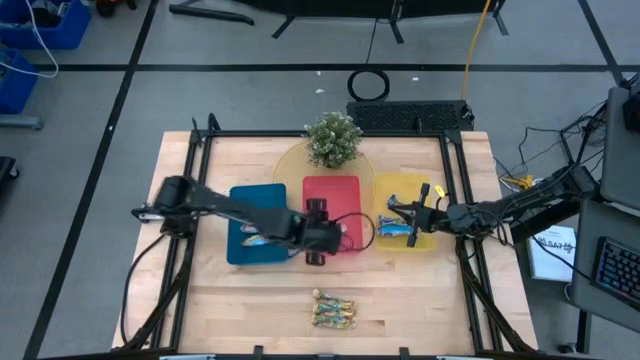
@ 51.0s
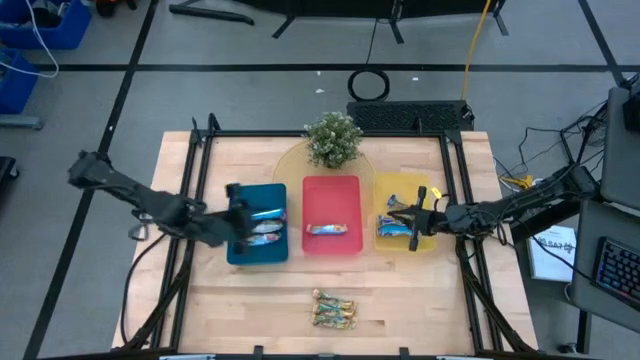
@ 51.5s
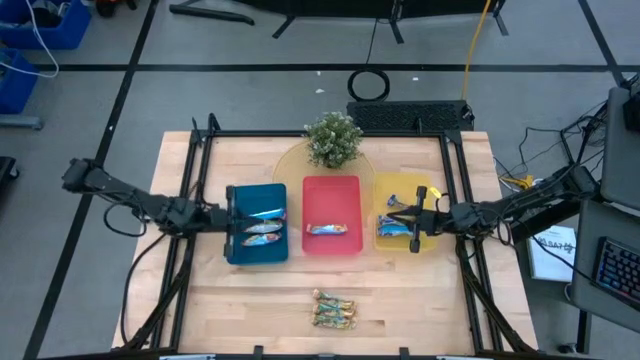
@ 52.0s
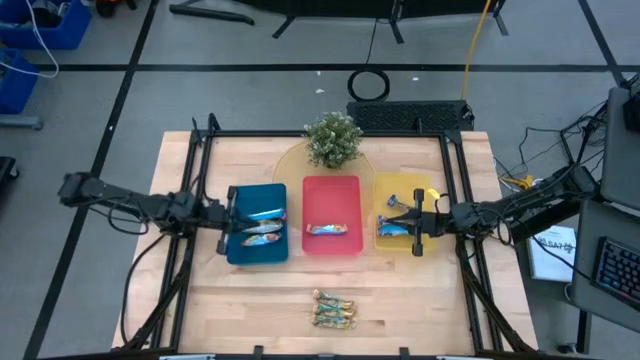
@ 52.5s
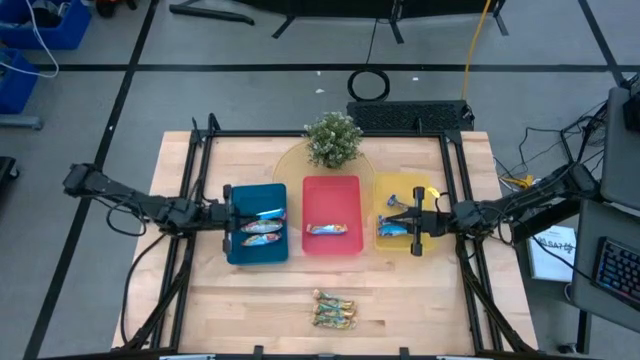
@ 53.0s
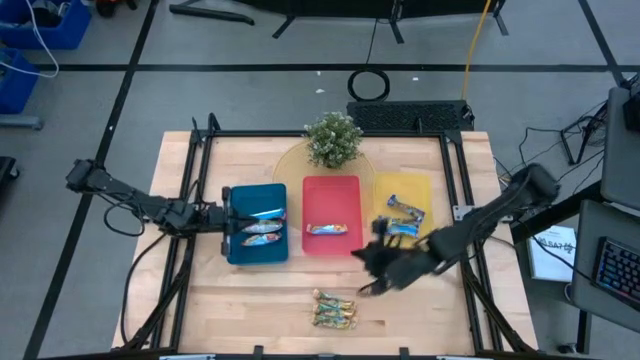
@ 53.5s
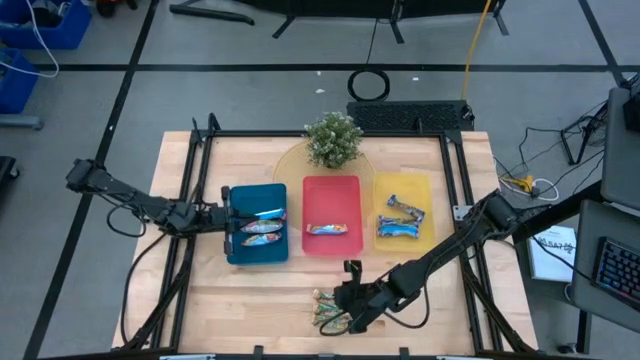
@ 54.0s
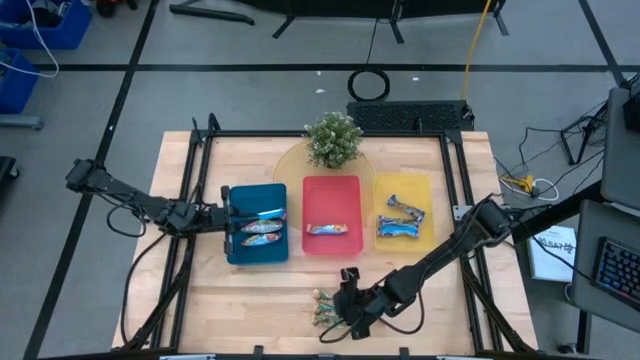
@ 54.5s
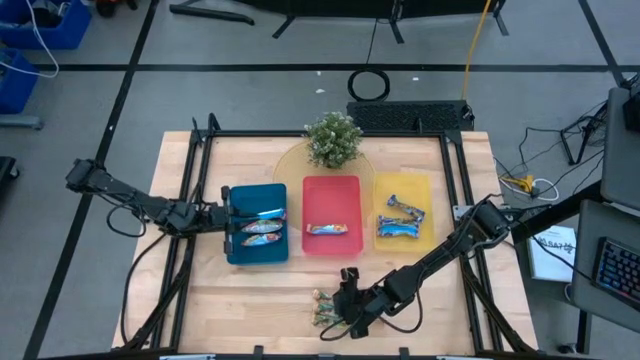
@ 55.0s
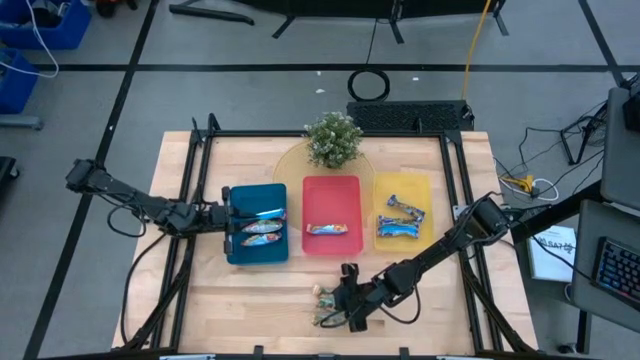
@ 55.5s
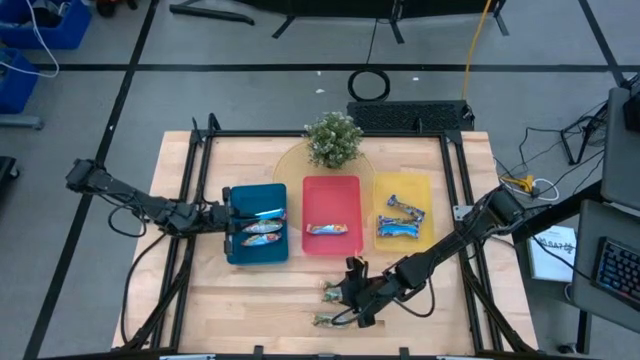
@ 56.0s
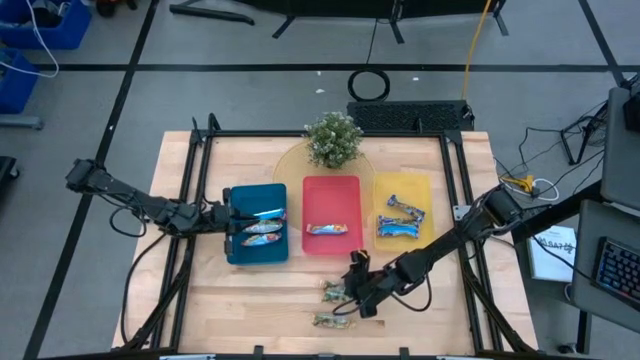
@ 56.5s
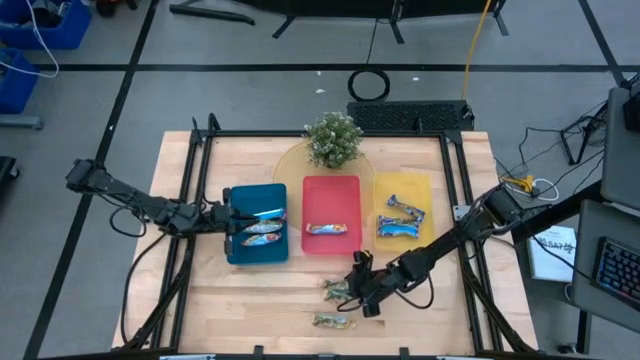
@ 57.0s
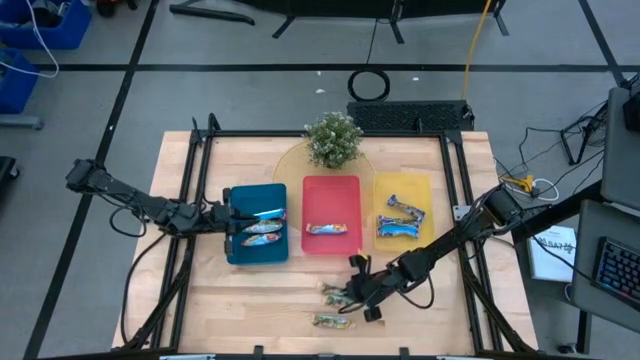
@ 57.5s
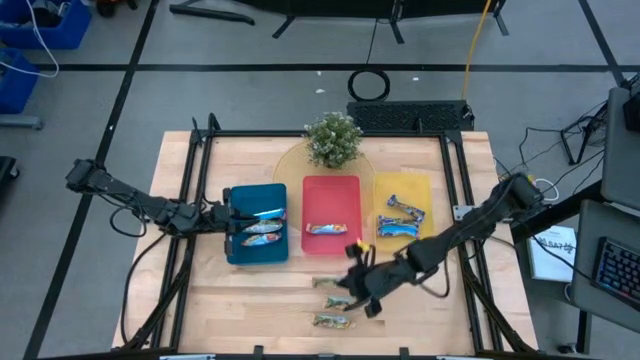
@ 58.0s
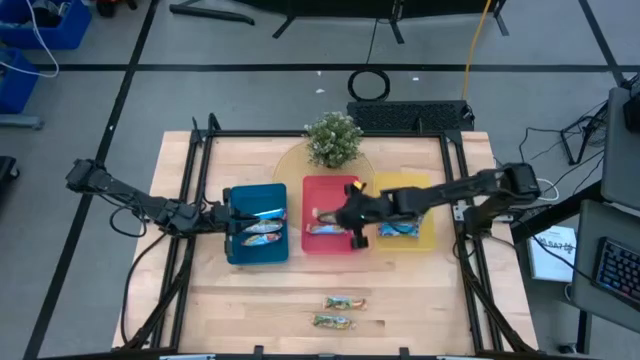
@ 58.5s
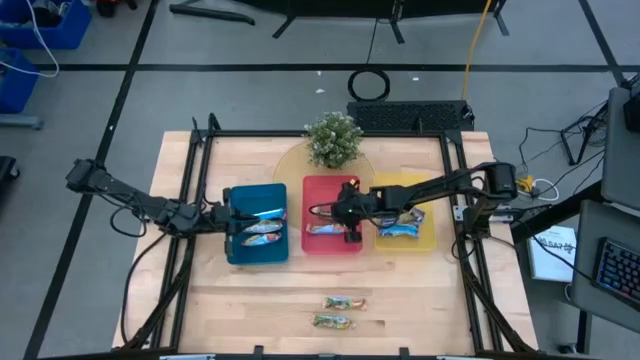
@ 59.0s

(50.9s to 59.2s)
Task: Pick and place Granola Bars by type
Put the yellow granola bar into the red bin

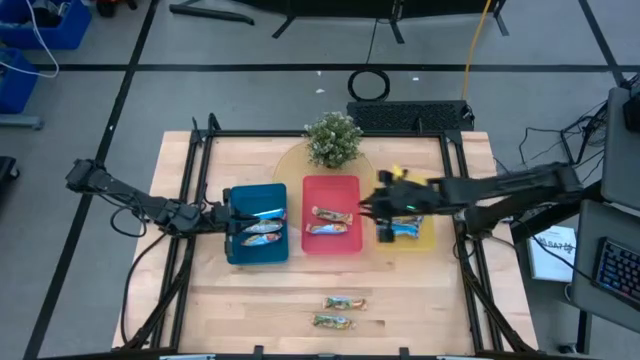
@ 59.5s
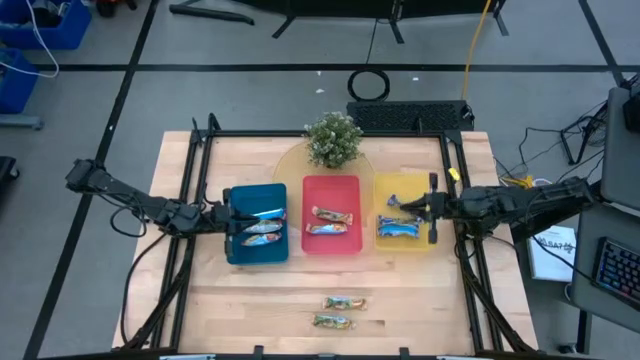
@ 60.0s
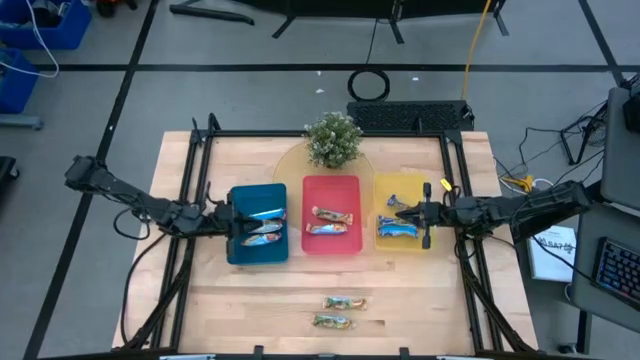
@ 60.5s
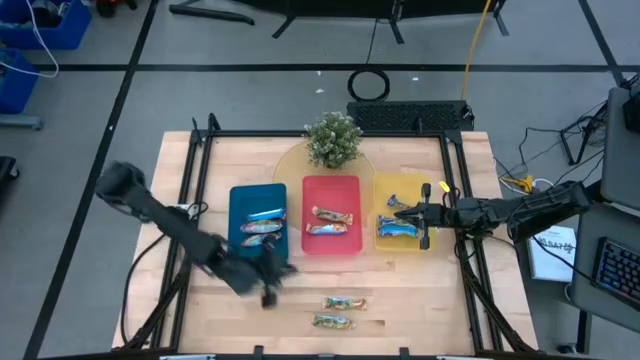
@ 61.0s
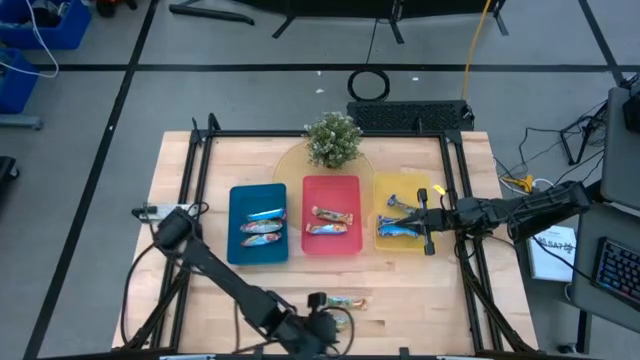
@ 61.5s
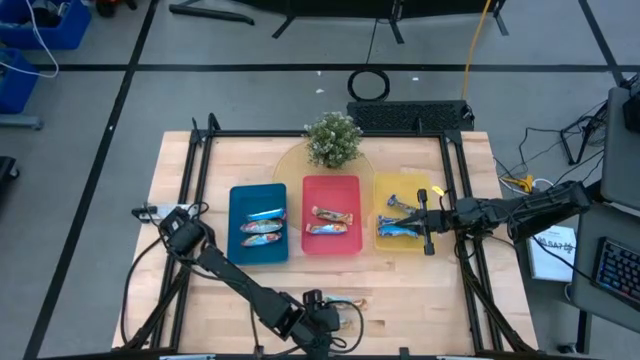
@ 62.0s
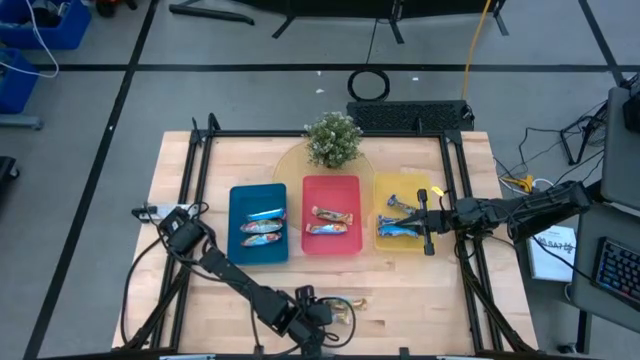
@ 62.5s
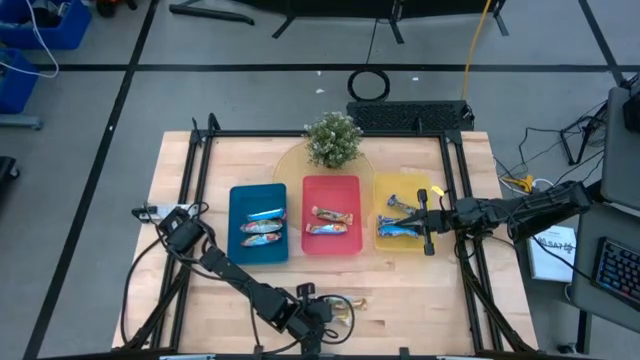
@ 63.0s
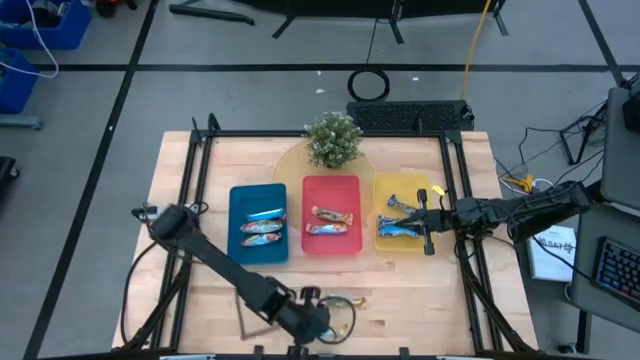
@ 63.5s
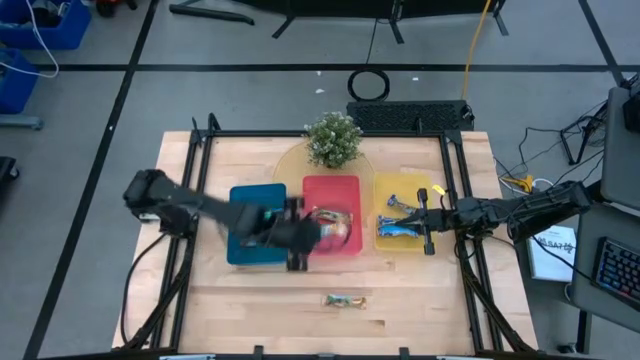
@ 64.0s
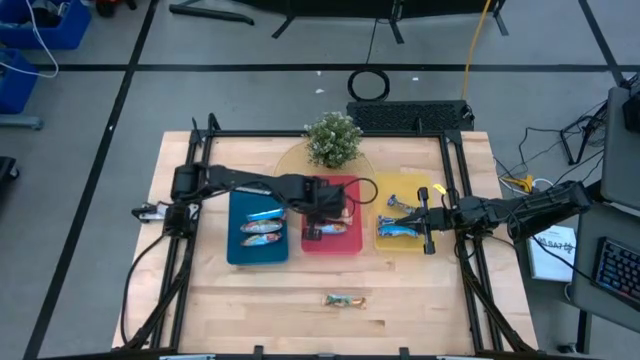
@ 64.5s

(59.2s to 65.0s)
Put the yellow granola bar into the red bin

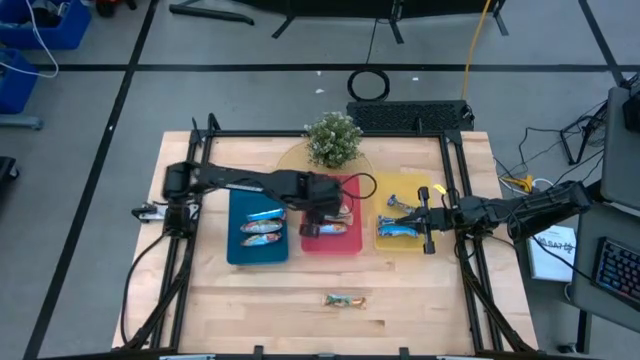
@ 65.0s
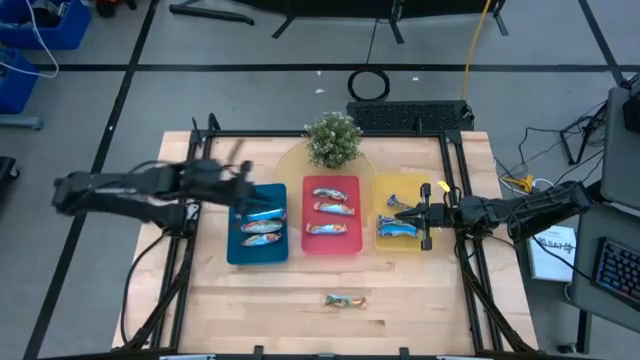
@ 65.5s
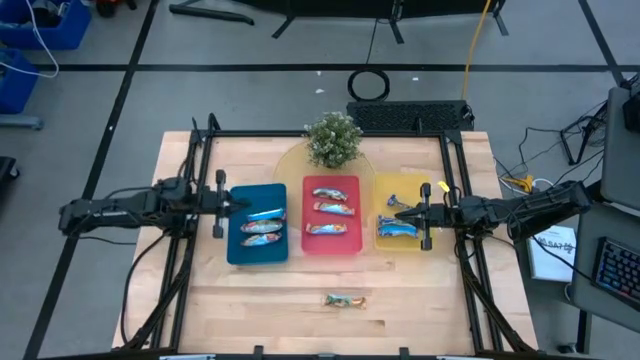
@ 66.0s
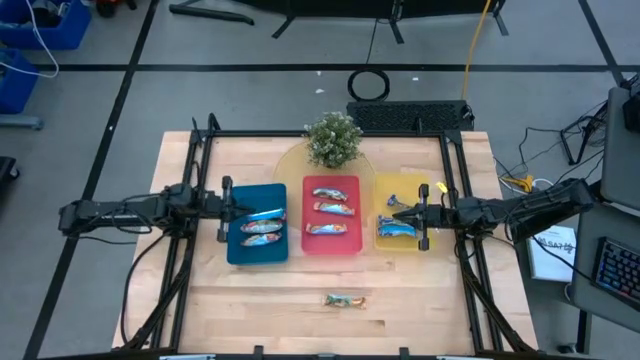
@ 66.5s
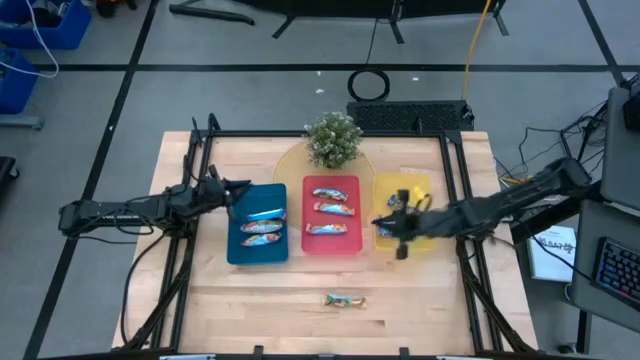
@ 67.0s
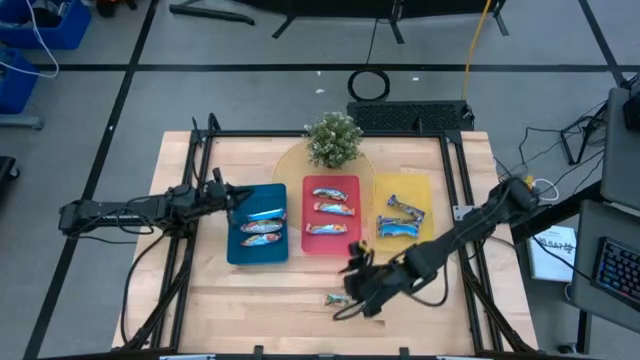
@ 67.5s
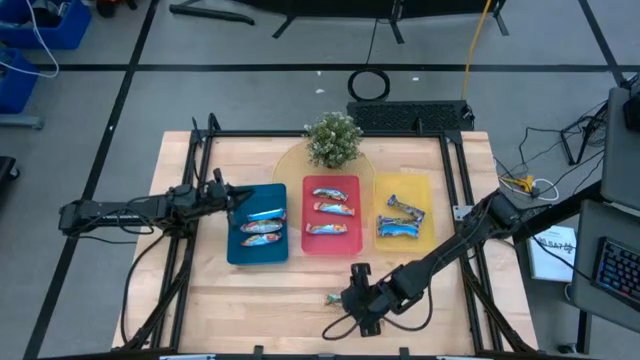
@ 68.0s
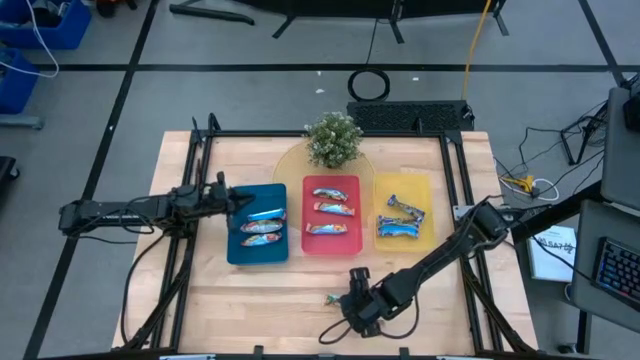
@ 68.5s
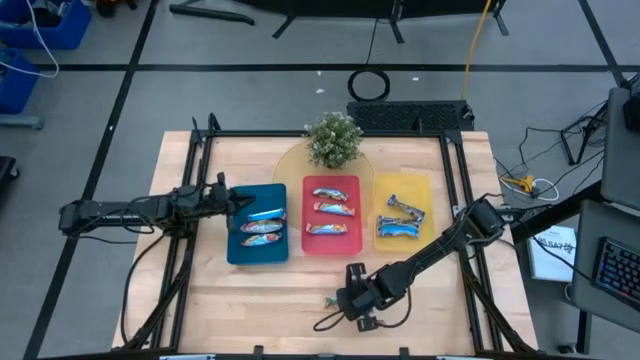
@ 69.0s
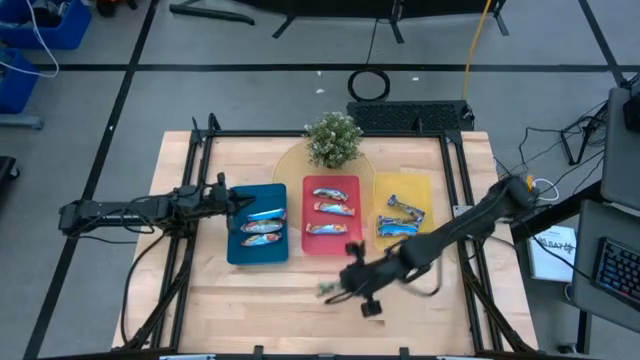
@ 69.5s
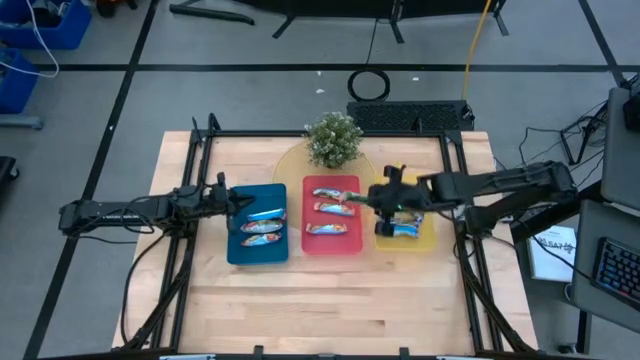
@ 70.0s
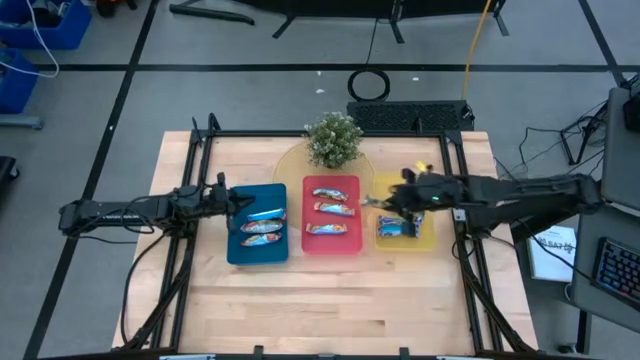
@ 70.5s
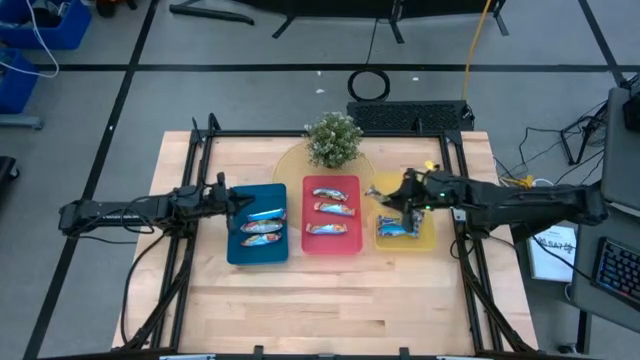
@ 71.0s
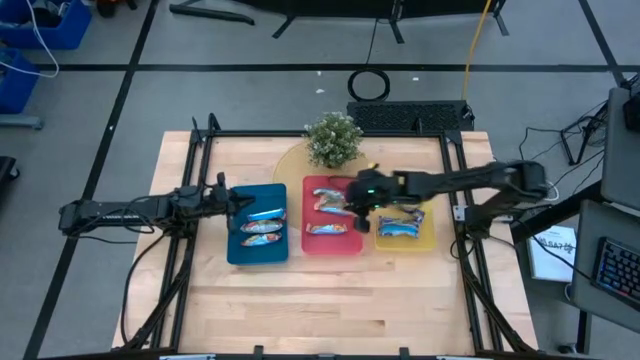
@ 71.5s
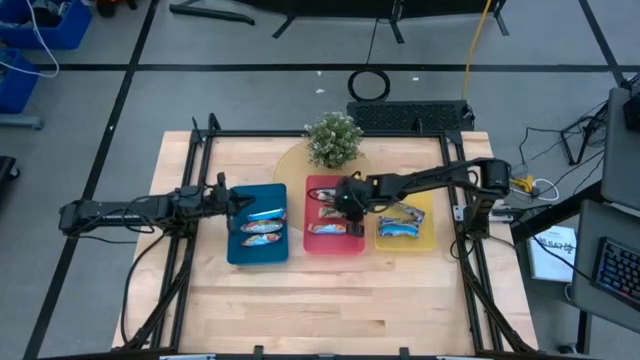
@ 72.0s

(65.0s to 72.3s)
Put the yellow granola bar into the red bin

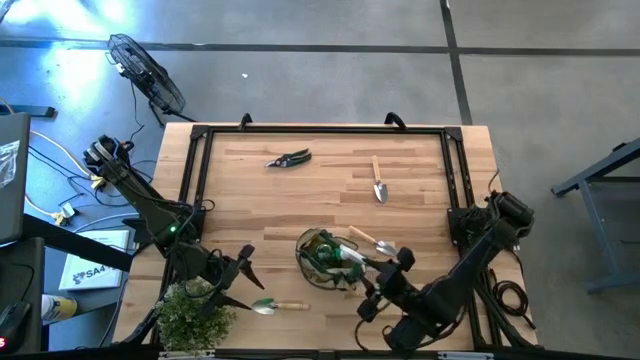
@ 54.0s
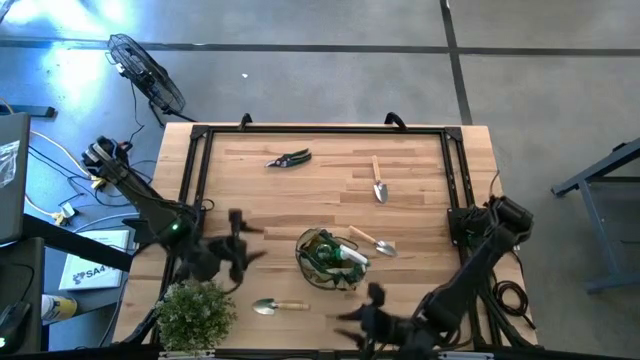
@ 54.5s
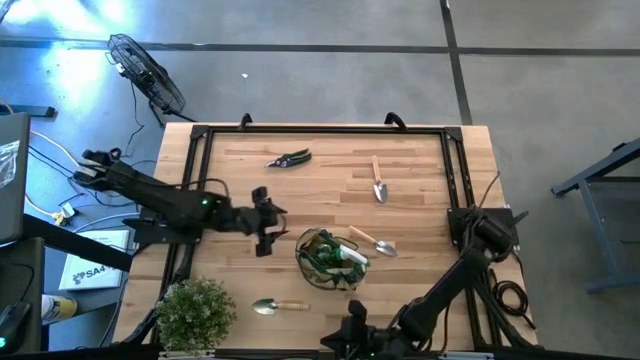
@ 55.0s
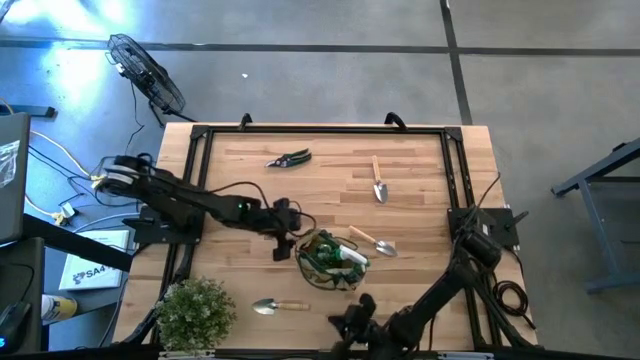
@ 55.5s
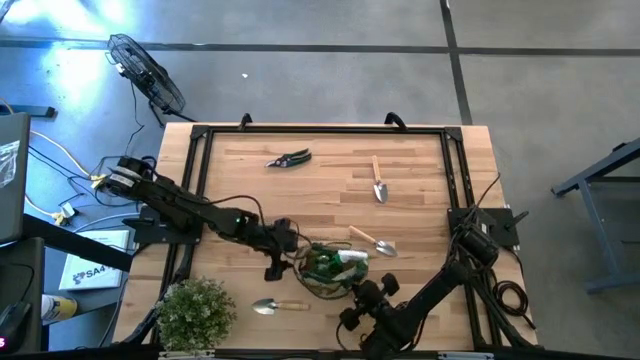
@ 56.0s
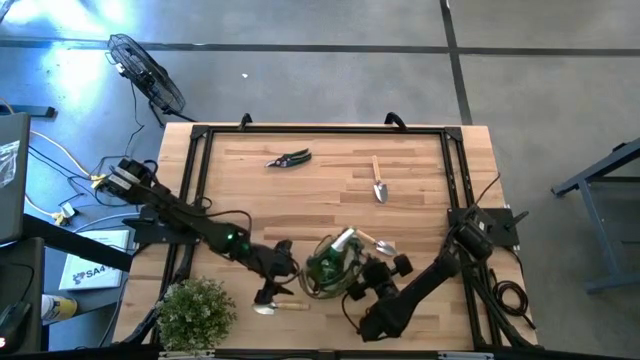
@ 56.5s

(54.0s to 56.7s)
Task: Pick & Place Garden tools in Gardening bag
Adjust the gardening bag
